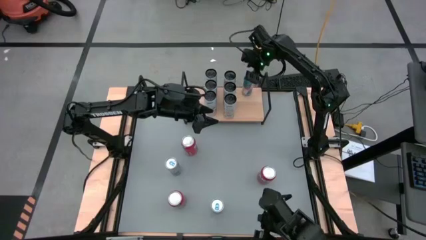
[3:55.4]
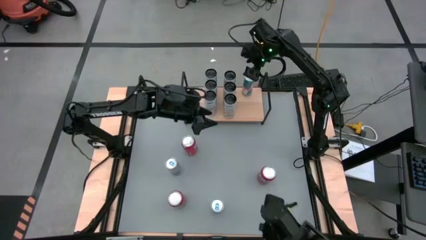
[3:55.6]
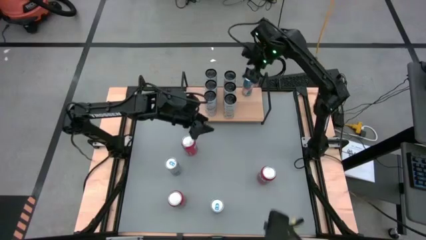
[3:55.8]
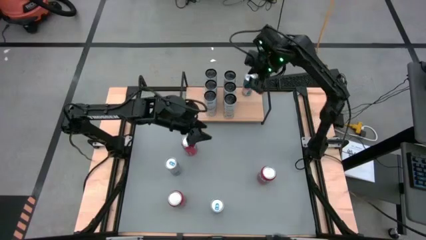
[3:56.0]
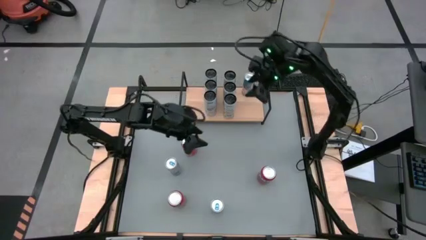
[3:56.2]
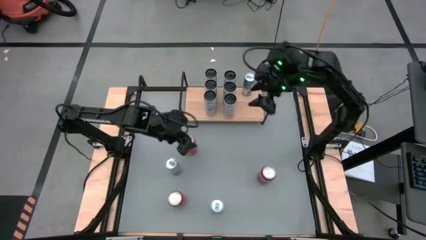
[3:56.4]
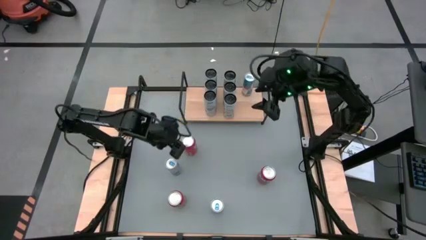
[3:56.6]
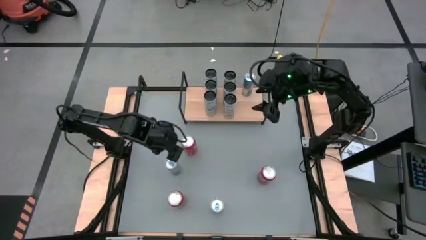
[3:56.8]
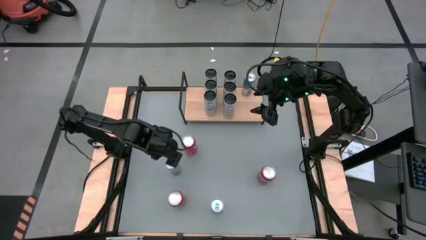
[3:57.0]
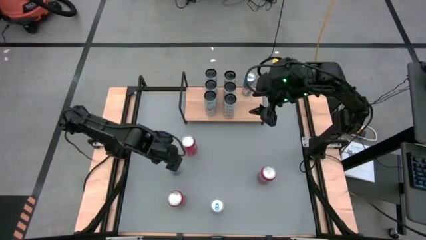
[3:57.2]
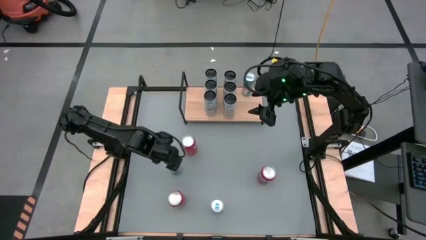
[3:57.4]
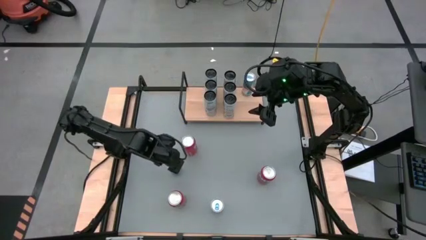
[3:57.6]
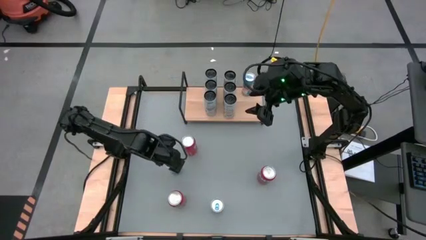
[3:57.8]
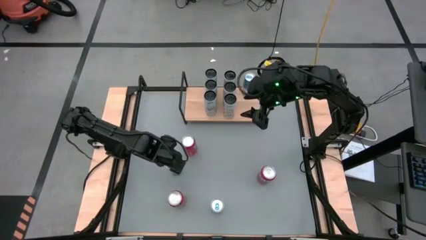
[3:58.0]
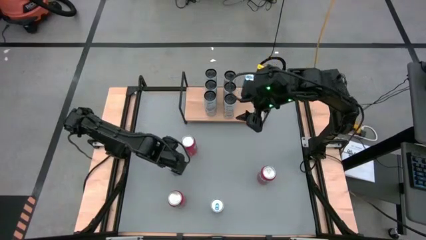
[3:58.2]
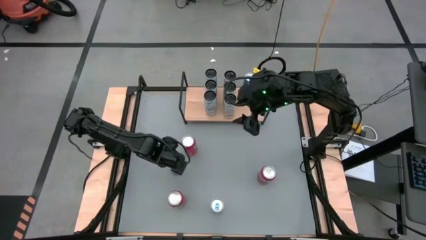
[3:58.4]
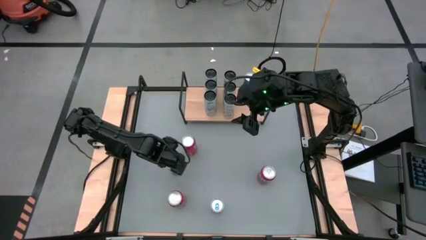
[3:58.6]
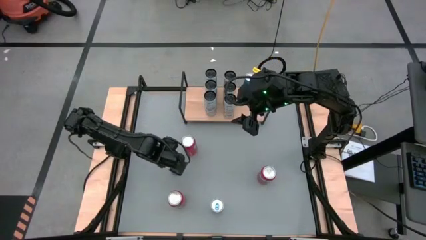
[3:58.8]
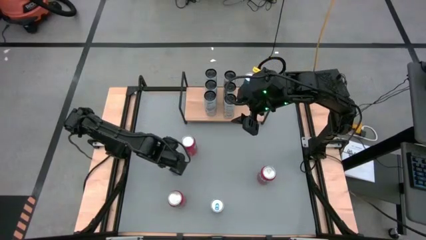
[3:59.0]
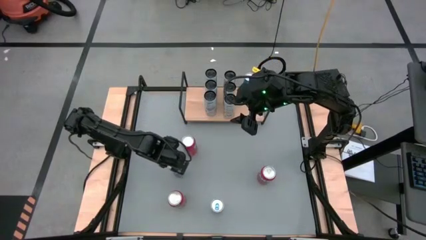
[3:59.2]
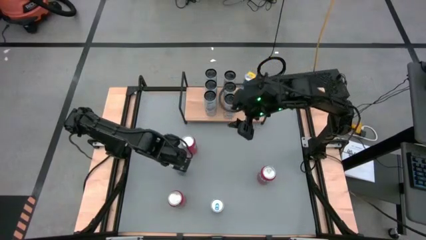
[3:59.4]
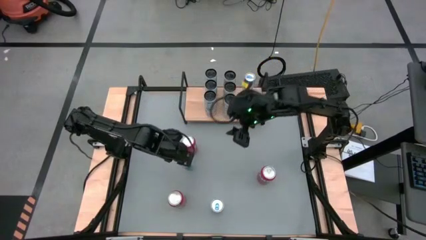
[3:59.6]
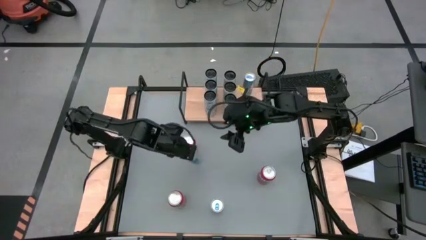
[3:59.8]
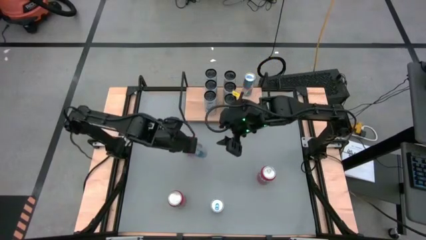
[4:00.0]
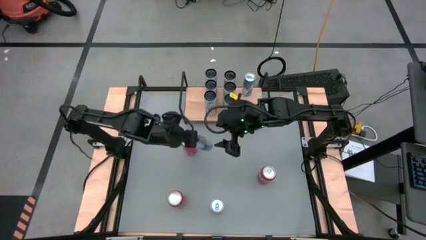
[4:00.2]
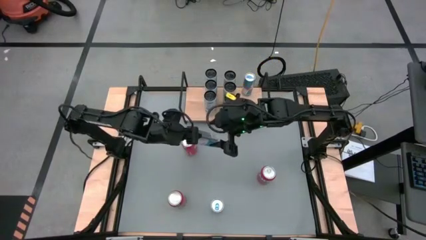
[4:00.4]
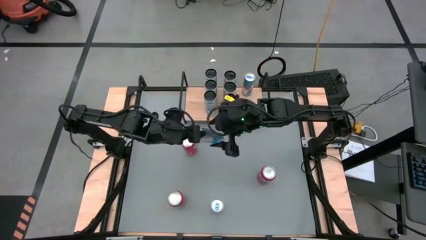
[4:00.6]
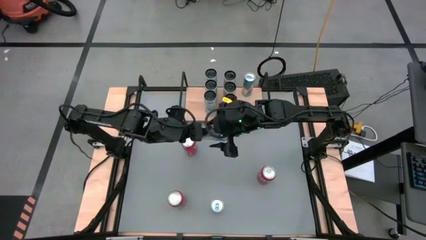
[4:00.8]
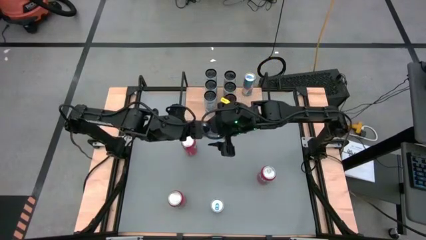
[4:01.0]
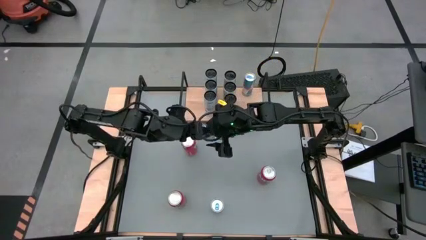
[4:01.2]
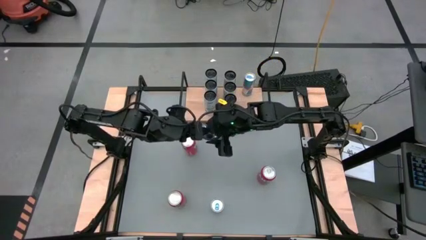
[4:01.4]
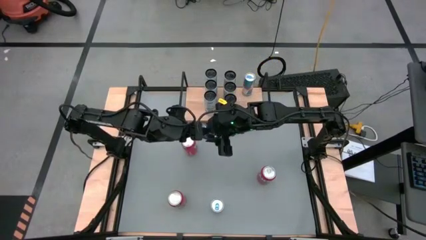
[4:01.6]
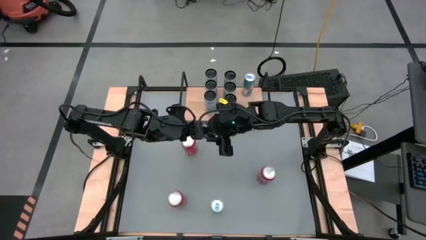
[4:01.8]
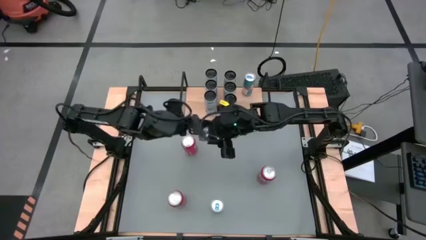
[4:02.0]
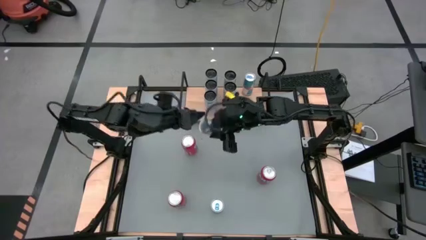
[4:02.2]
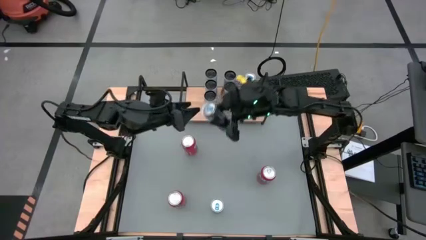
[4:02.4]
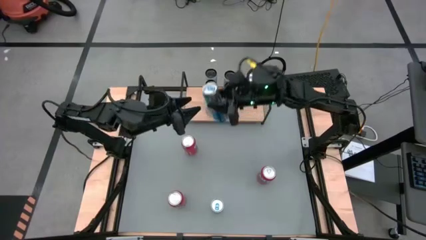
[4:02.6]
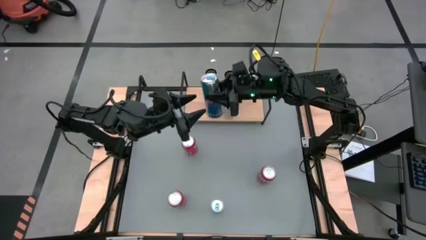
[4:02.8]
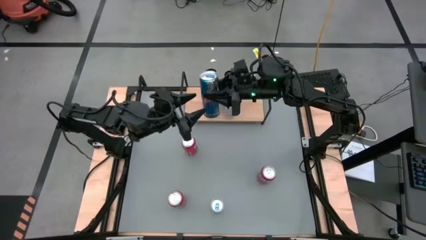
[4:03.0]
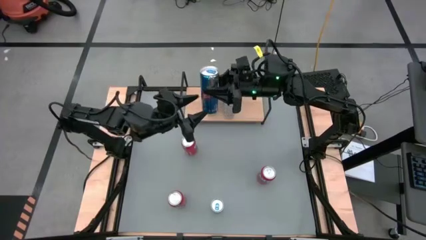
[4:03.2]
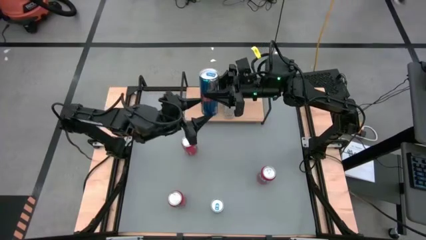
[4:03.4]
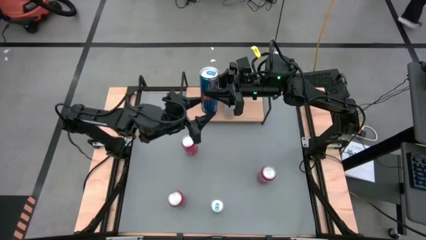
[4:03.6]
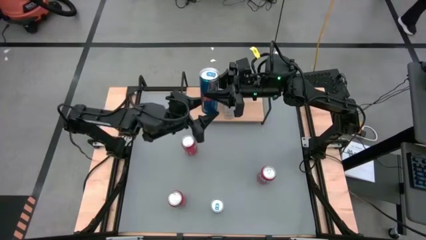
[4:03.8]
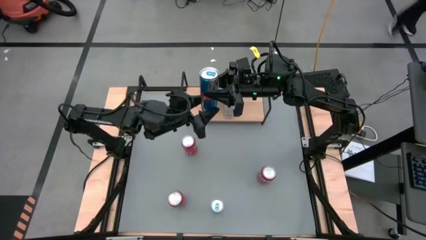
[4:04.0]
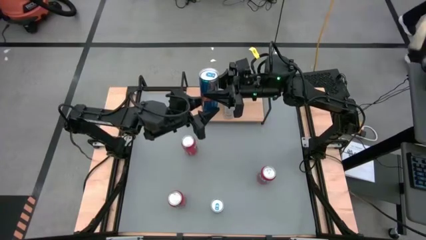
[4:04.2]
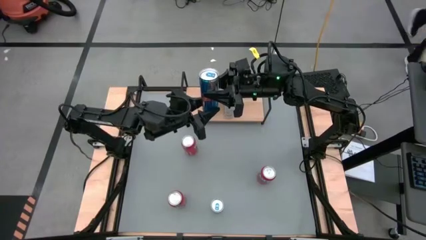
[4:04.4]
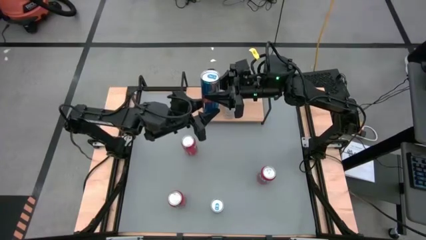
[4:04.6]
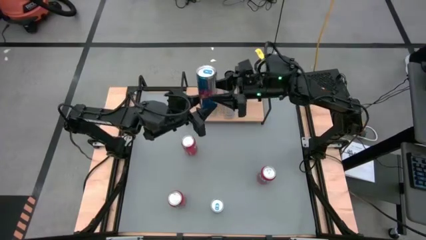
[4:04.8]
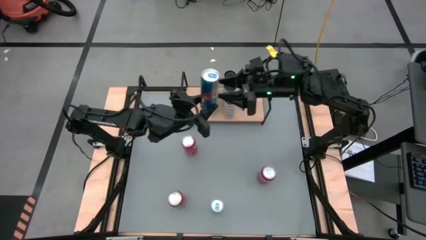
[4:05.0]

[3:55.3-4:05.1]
Task: Place canned beverage on shelf
Put the top blue soda can aligned with the other blue soda can on the shelf

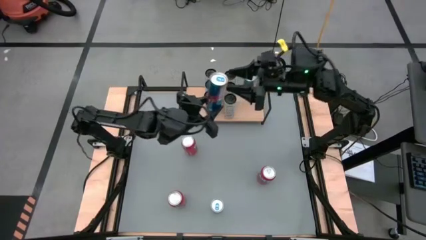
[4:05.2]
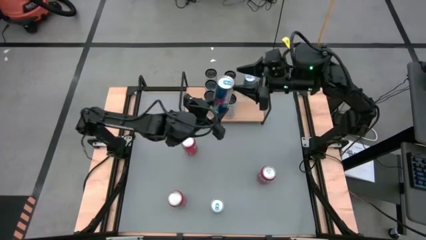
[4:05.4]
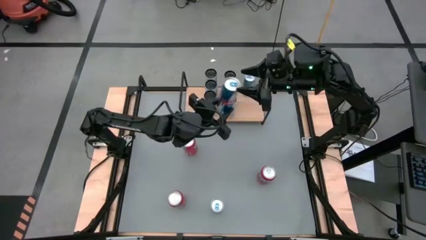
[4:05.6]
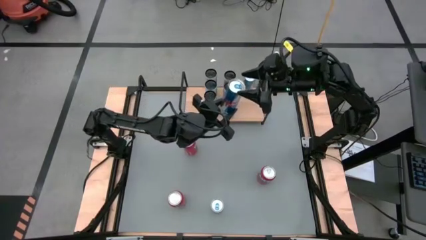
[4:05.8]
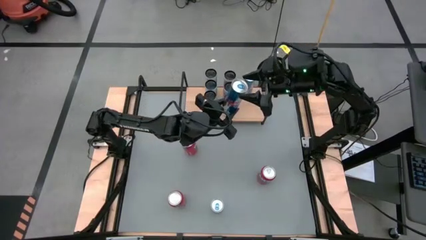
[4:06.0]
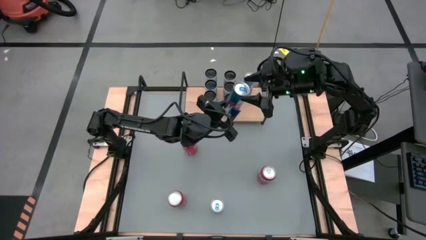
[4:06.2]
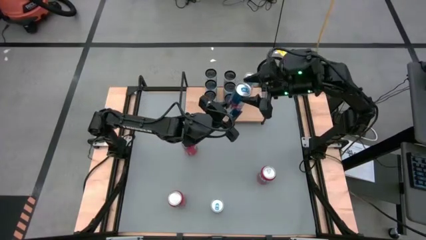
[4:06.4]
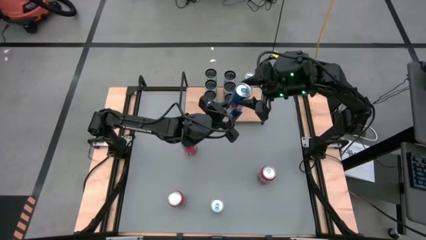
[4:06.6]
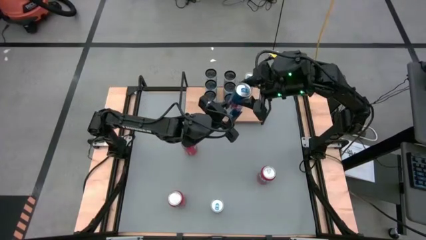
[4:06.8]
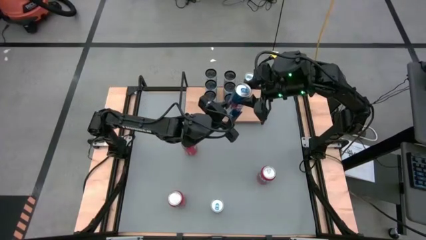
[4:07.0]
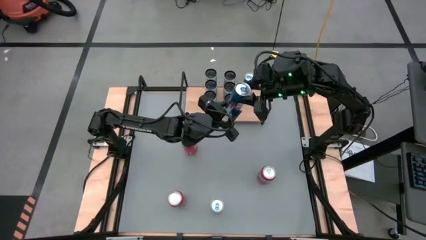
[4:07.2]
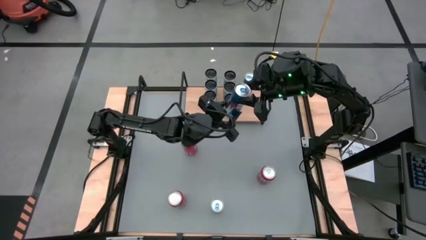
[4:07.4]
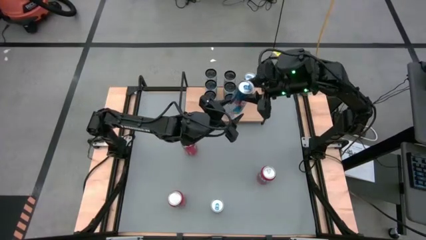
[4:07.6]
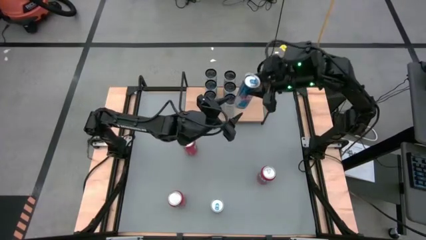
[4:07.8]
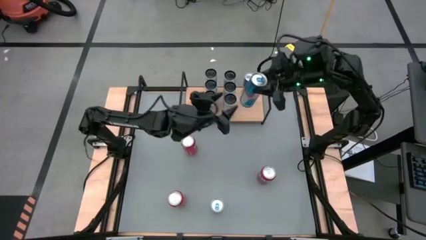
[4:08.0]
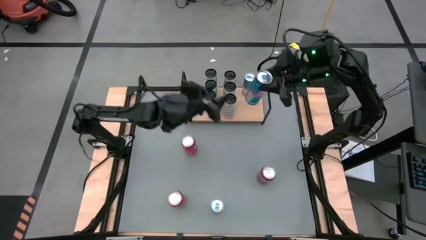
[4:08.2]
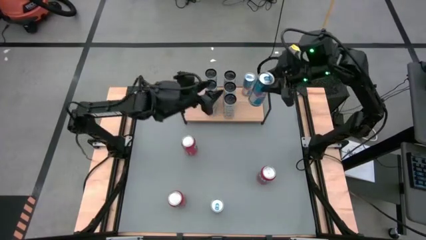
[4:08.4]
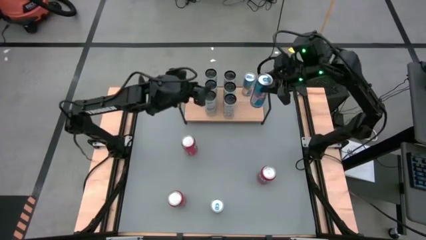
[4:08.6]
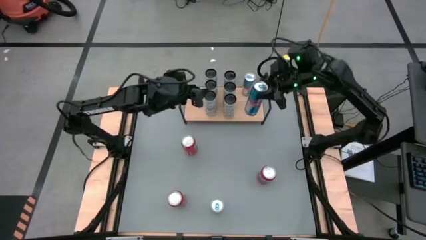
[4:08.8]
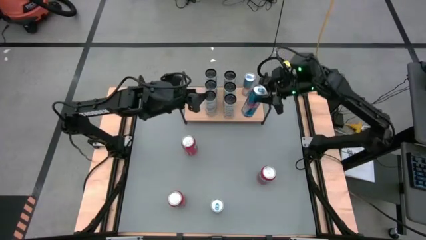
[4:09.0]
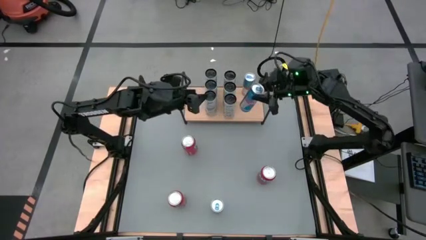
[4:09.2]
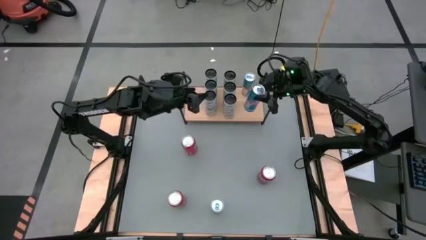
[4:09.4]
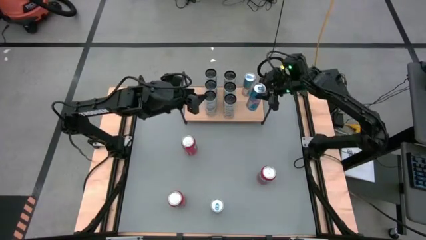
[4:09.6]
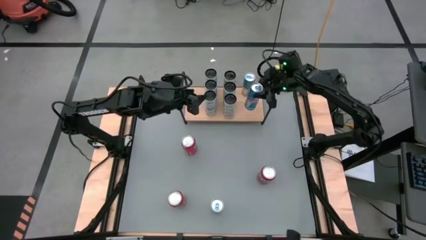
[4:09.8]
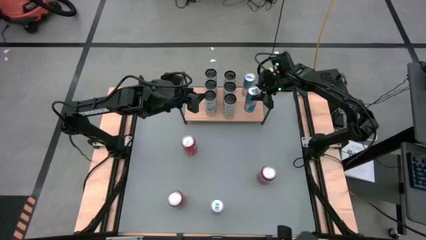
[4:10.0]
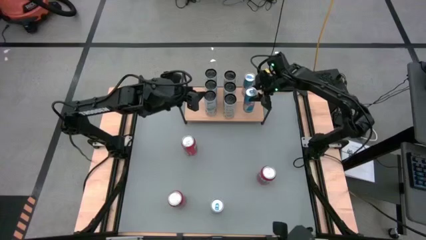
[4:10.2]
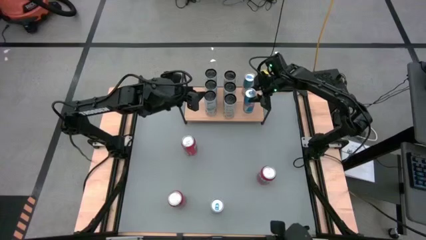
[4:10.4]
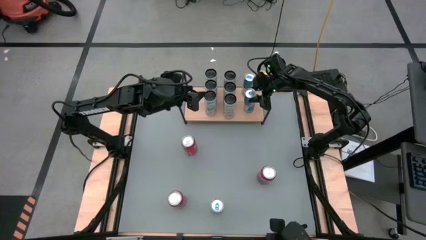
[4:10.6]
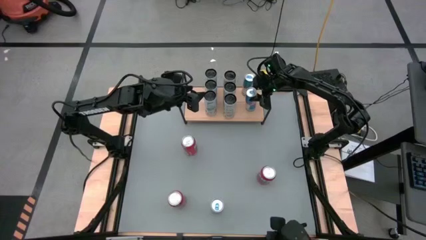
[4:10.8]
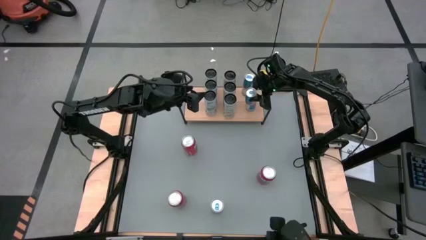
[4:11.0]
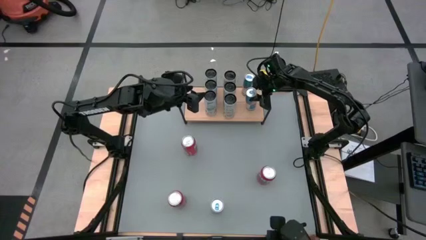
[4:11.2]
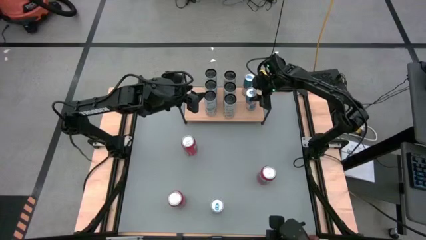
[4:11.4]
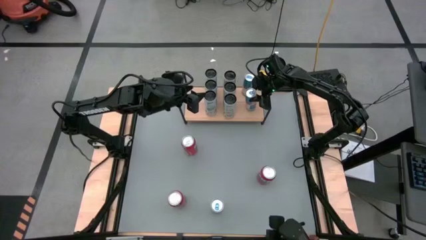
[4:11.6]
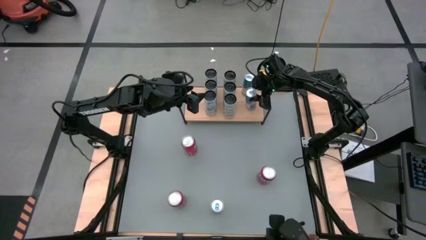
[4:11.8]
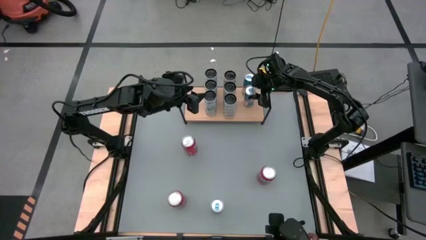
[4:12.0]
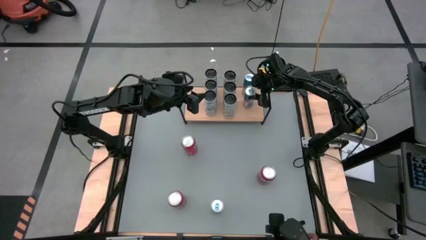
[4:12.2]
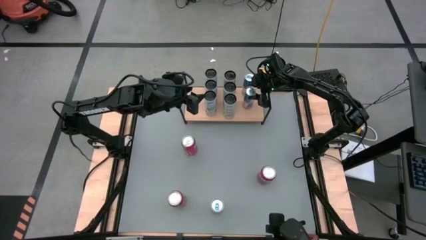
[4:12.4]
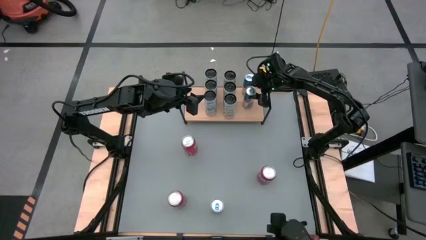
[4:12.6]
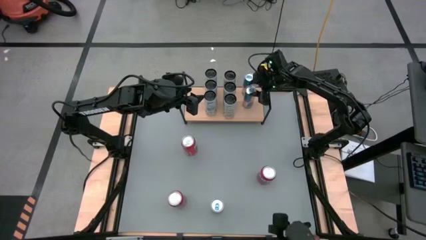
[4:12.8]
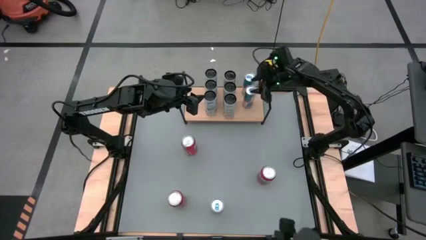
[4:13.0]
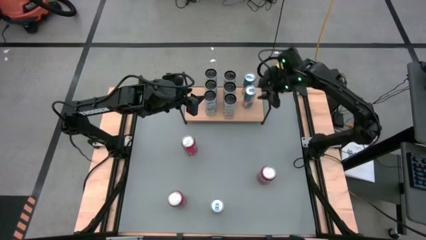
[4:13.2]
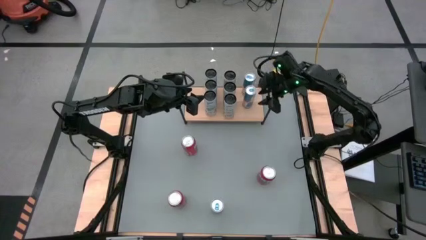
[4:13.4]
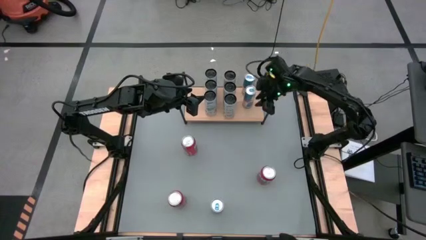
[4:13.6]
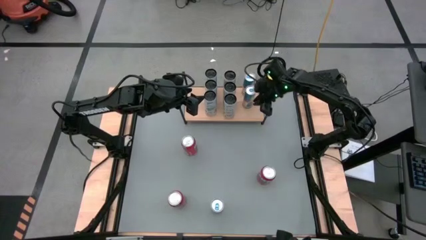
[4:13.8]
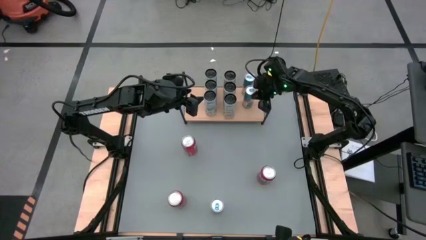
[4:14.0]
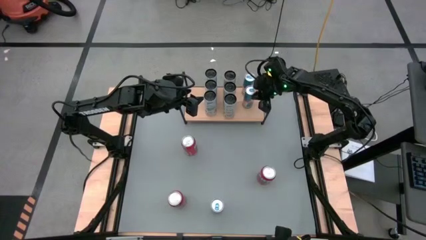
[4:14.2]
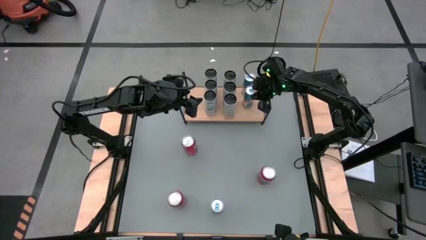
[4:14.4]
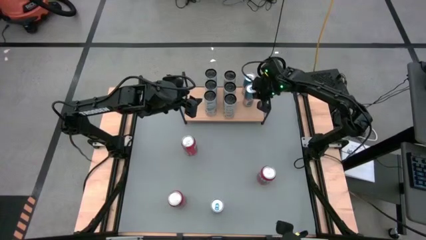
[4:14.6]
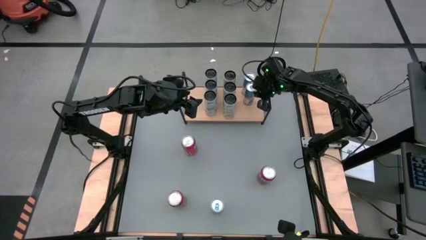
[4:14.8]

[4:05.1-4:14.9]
Put the top blue soda can aligned with the other blue soda can on the shelf
